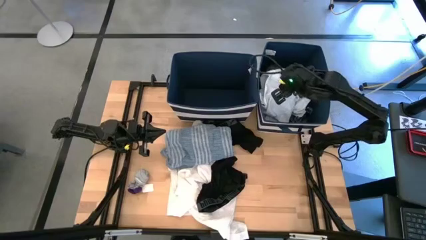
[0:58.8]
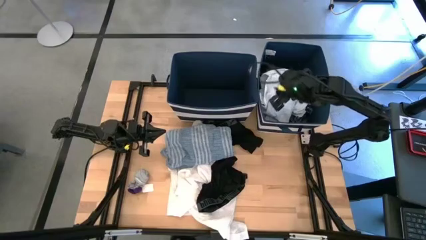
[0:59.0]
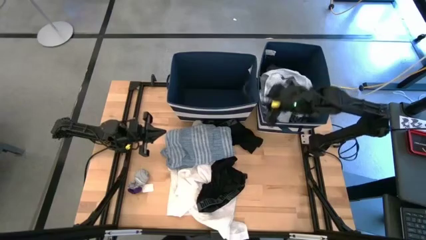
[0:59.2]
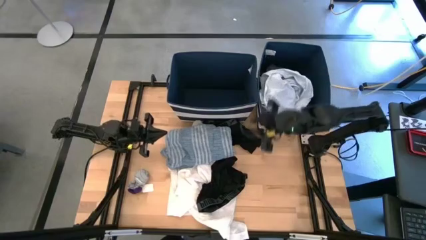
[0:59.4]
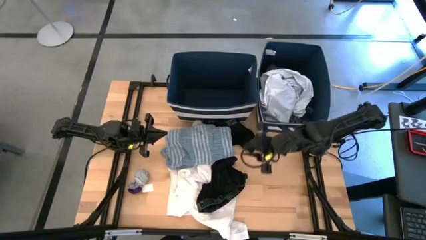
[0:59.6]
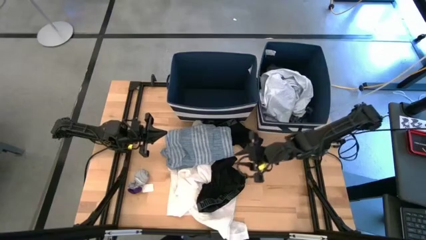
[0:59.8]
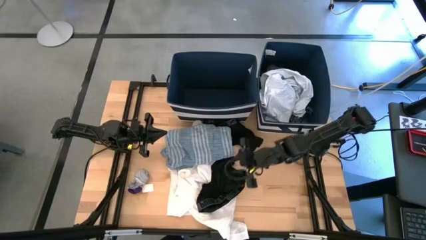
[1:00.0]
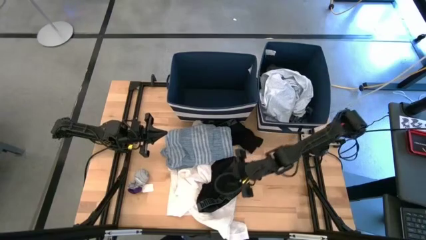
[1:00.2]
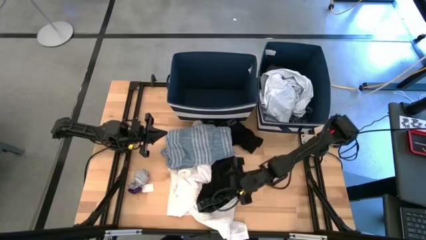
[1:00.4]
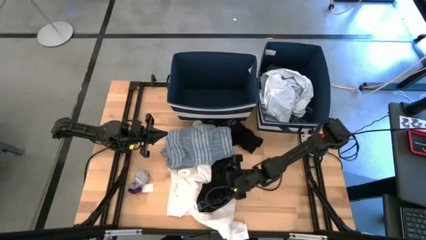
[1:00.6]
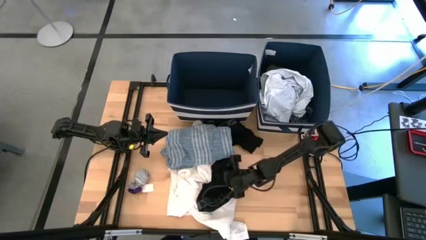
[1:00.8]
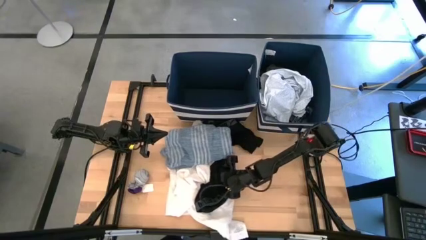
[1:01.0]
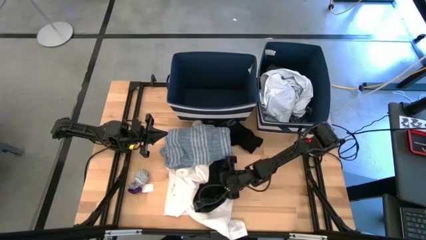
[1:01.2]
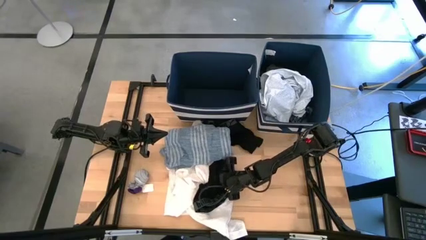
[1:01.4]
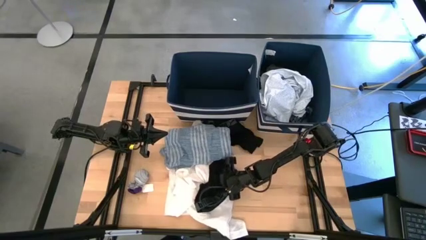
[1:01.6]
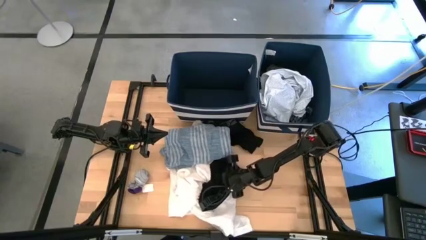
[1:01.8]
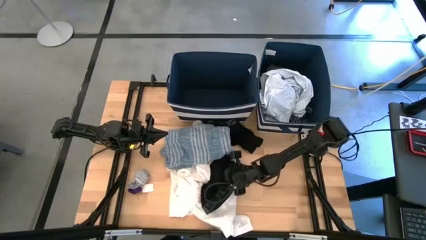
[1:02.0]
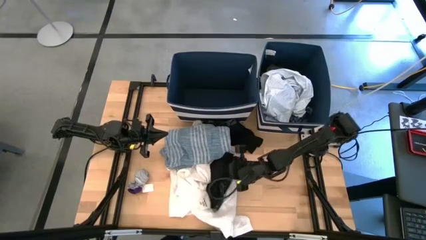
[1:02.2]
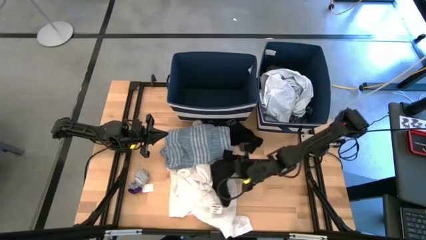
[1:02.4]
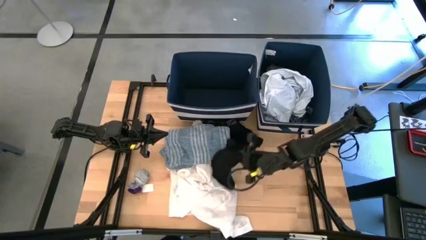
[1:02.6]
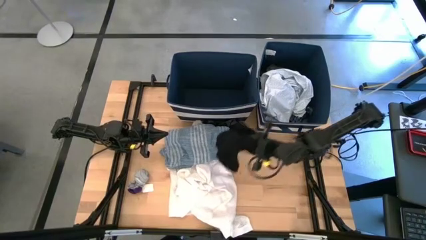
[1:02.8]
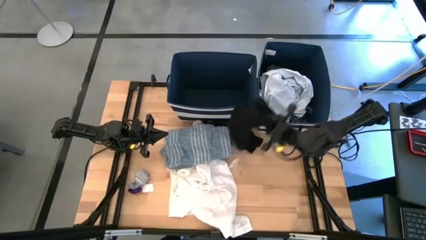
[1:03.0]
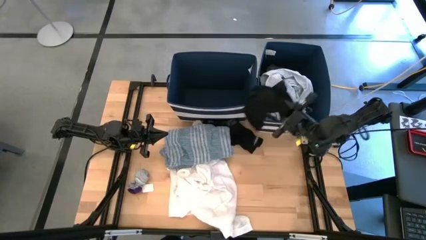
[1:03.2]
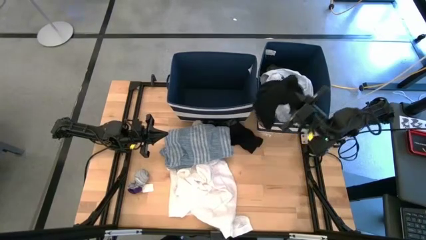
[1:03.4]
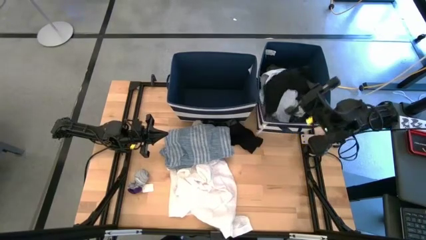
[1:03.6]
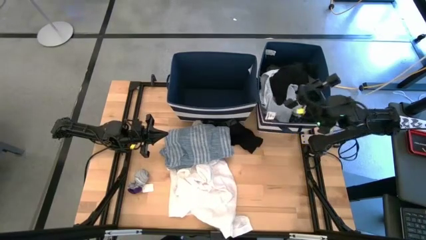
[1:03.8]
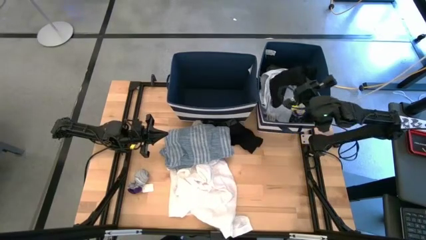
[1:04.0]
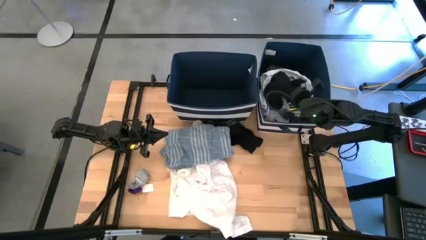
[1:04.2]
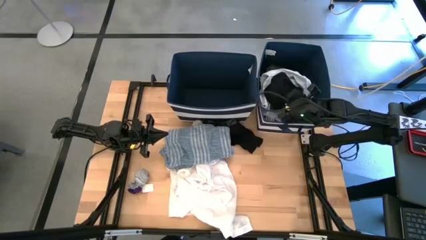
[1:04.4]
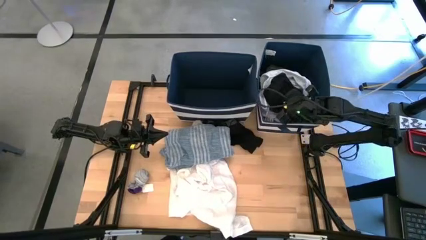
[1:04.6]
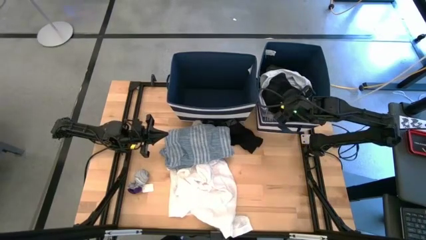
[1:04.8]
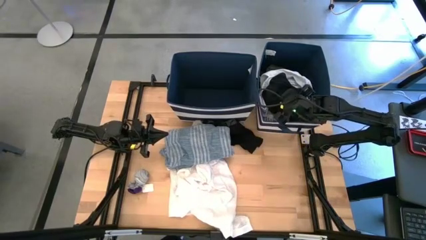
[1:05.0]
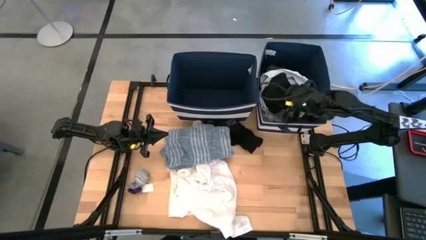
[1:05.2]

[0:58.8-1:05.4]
Task: Sort clothes
Put the black underwear into the right blue laundry organizer

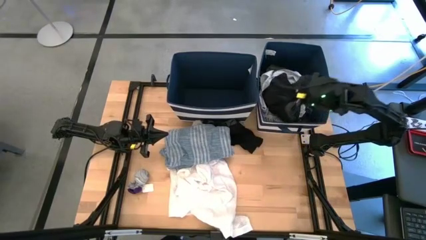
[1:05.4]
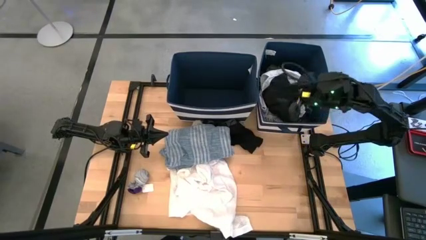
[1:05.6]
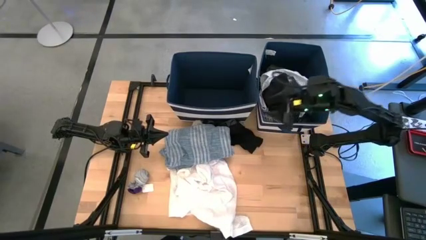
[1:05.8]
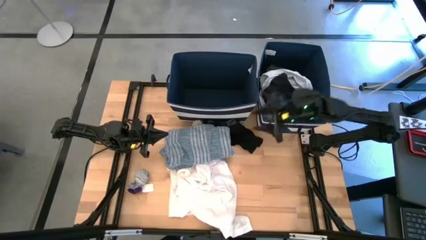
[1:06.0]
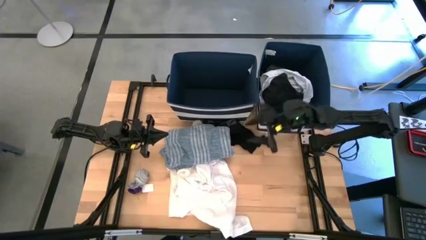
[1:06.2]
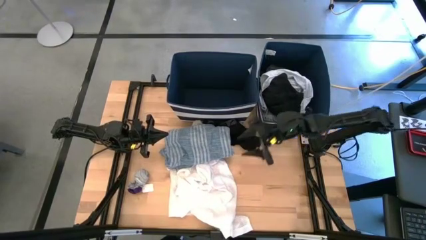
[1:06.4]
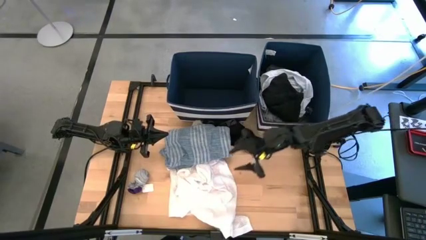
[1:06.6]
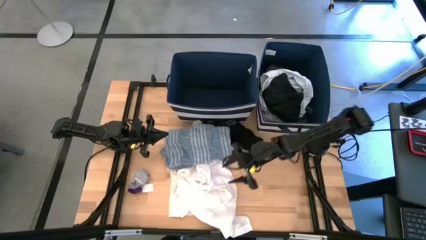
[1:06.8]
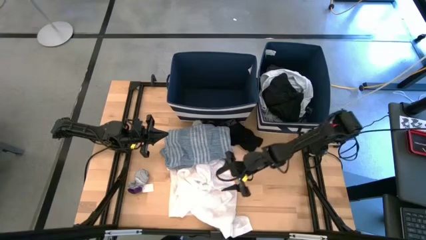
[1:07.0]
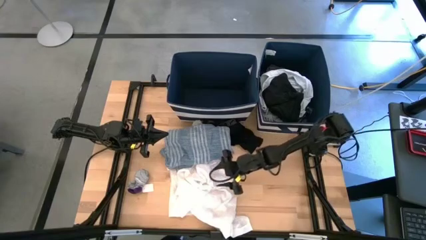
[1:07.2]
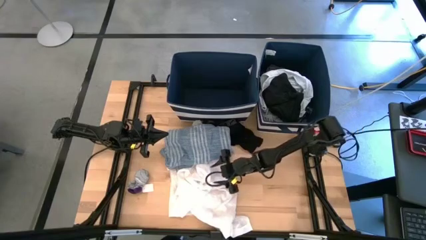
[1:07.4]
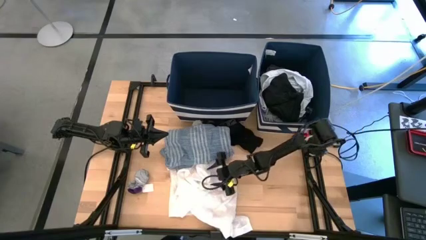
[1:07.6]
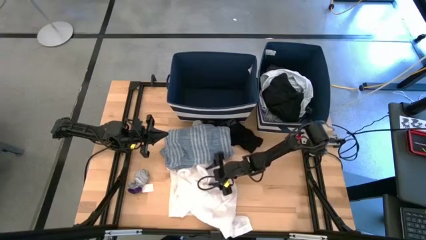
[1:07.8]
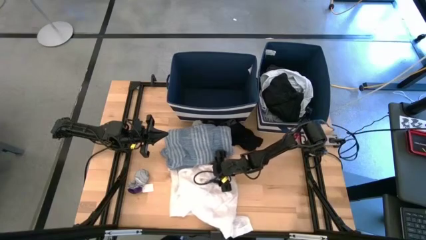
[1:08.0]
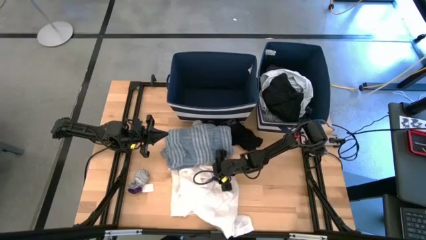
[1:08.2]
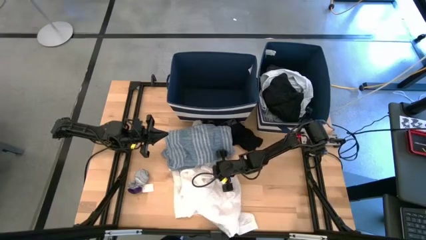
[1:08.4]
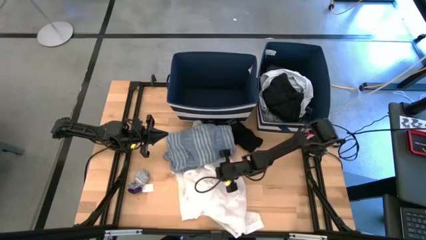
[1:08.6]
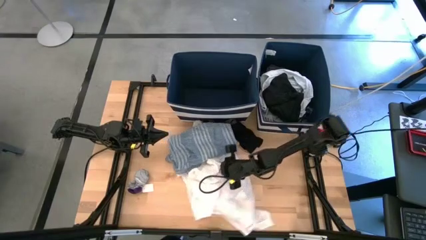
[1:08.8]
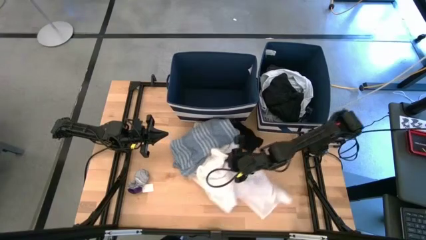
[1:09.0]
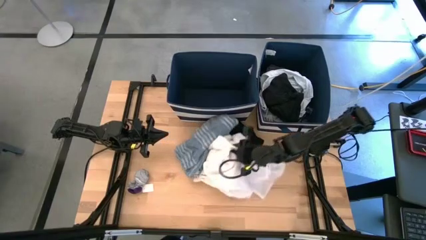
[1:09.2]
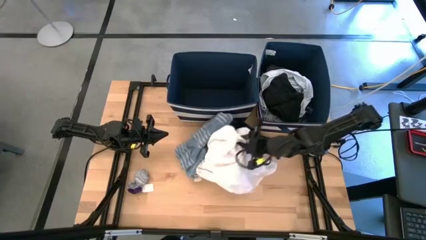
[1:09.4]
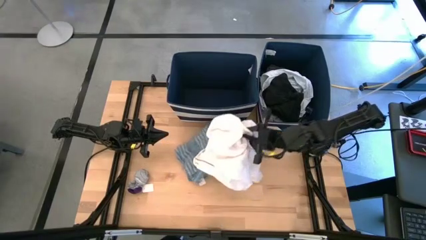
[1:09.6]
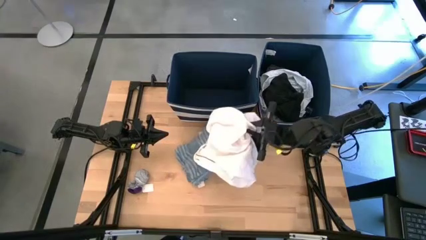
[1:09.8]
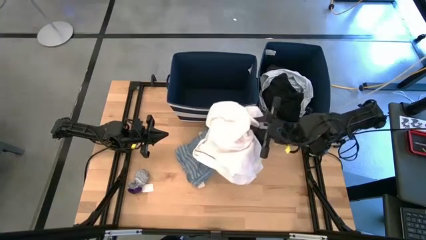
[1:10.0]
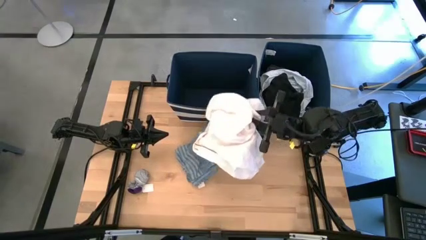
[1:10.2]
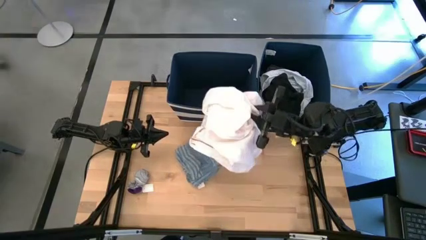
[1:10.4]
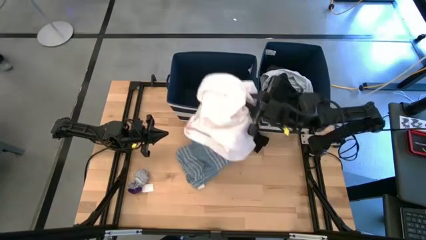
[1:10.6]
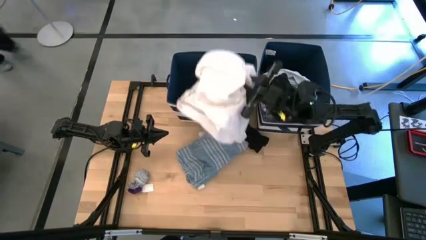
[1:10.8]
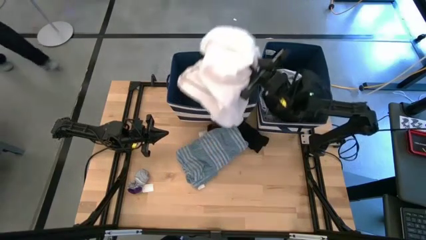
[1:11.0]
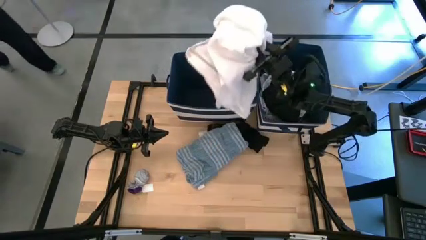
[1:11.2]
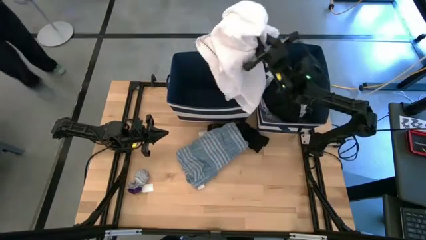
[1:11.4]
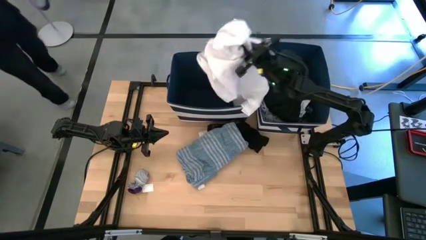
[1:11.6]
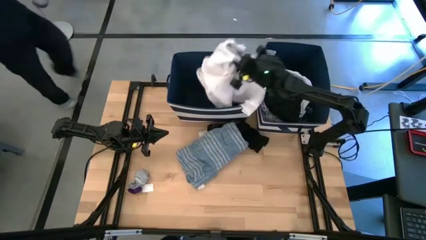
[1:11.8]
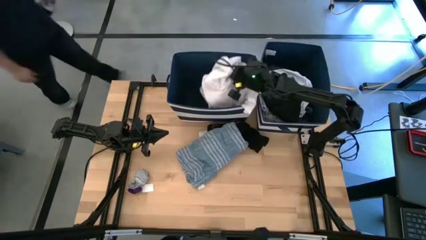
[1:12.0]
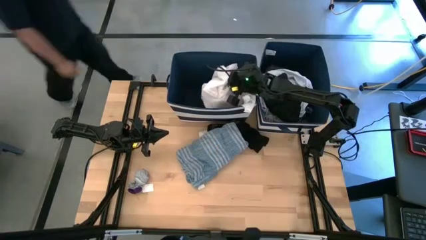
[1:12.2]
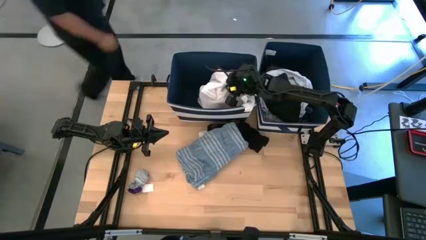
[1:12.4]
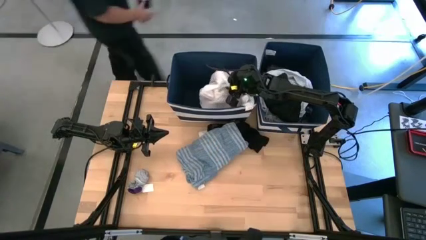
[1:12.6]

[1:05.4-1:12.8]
Put the white polo into the left blue laundry organizer
